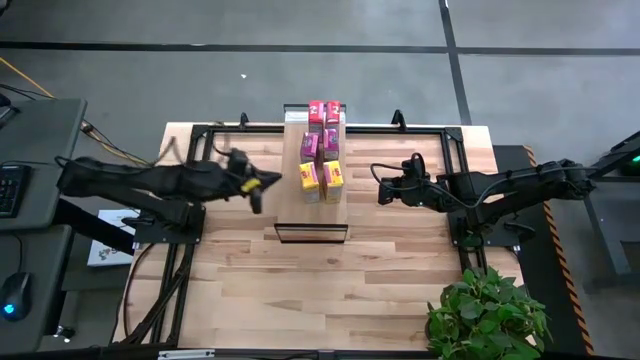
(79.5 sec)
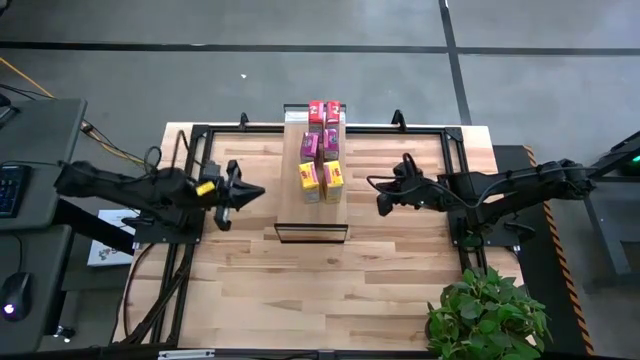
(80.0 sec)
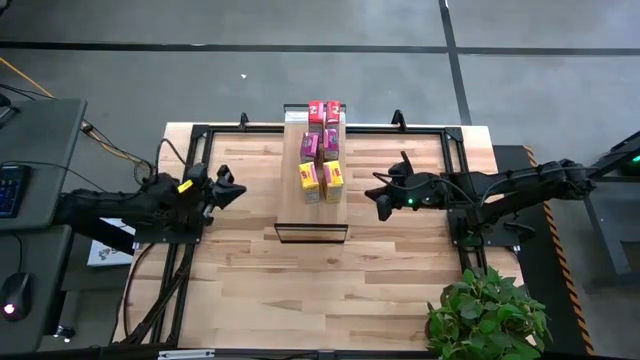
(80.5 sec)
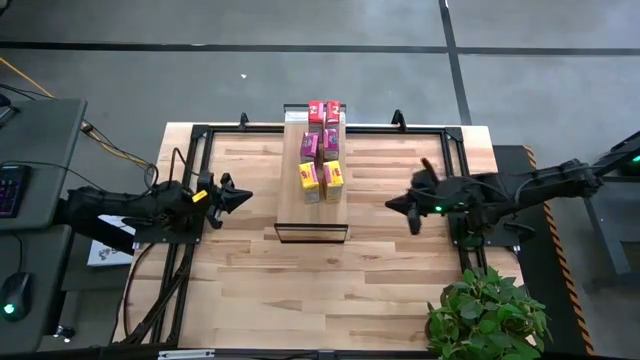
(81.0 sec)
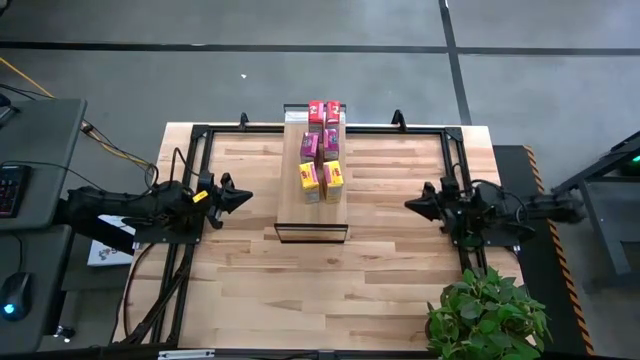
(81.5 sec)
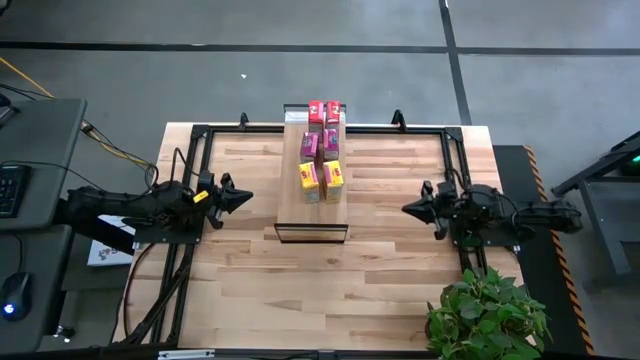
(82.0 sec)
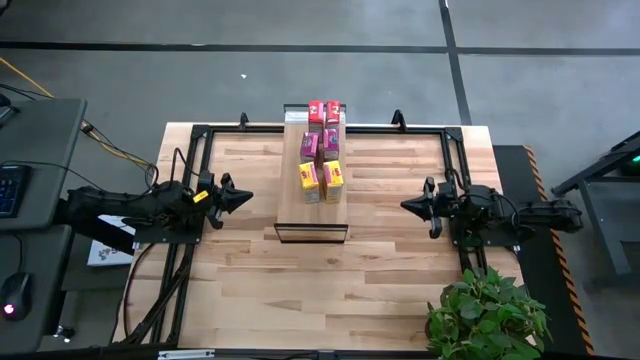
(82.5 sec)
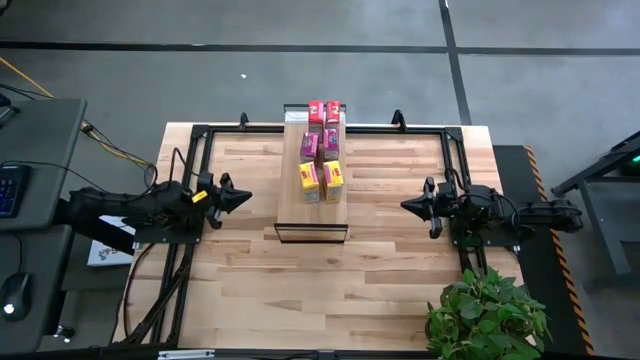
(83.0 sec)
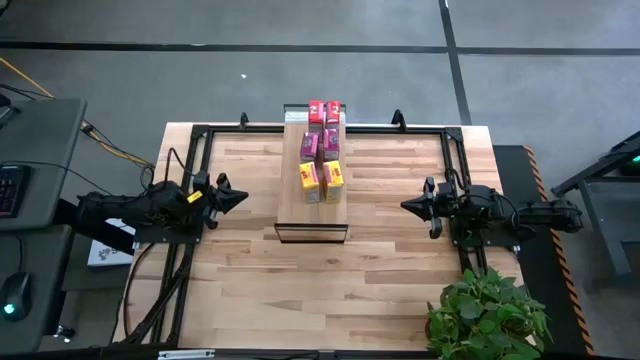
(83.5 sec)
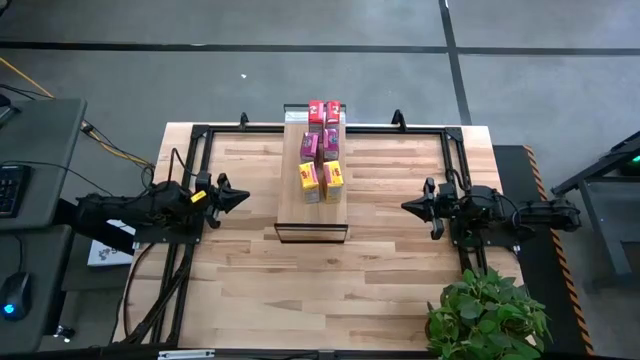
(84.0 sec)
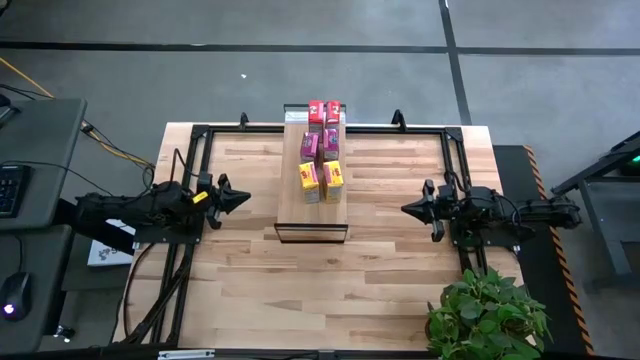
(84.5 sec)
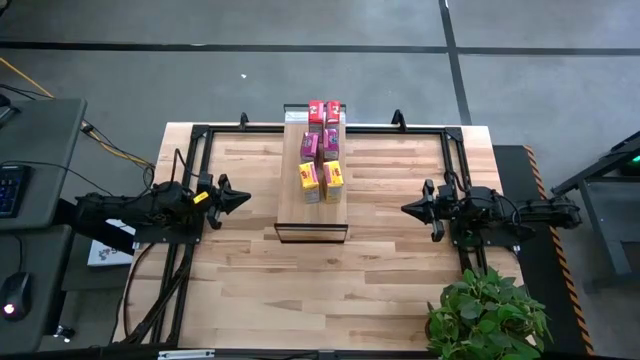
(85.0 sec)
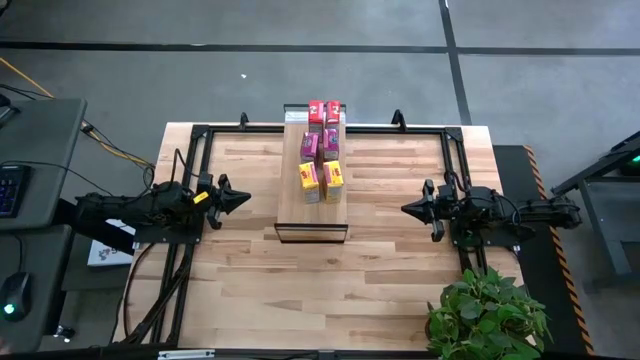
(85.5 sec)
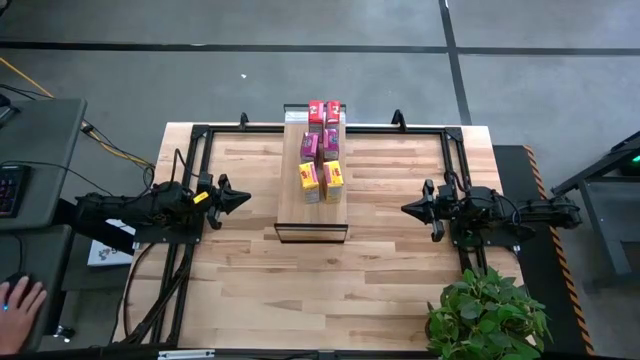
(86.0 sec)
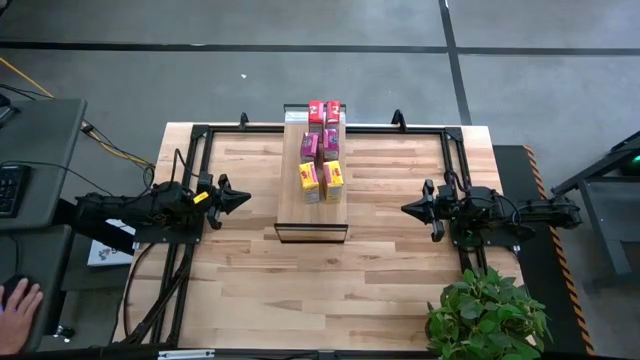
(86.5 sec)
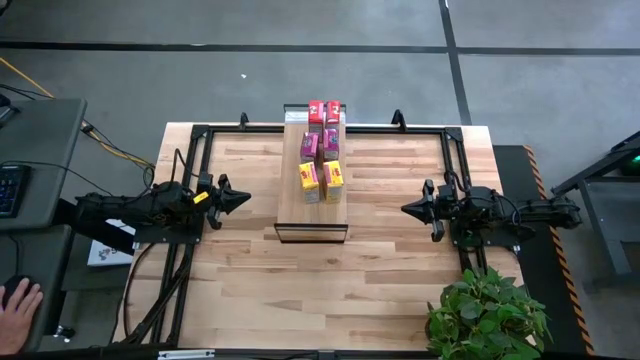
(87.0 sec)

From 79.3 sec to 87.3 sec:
Task: Stack cereal on shelf
Return to Home Position

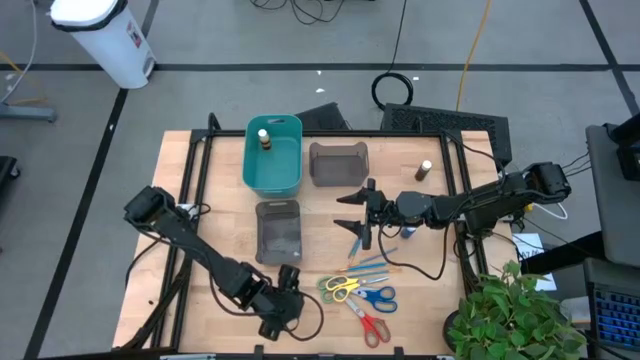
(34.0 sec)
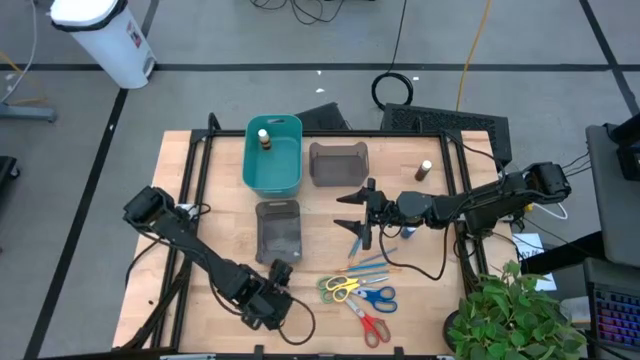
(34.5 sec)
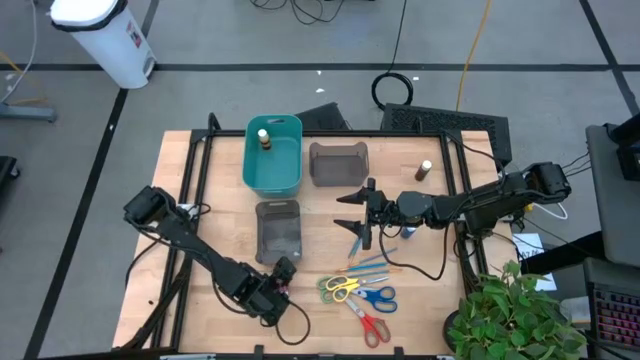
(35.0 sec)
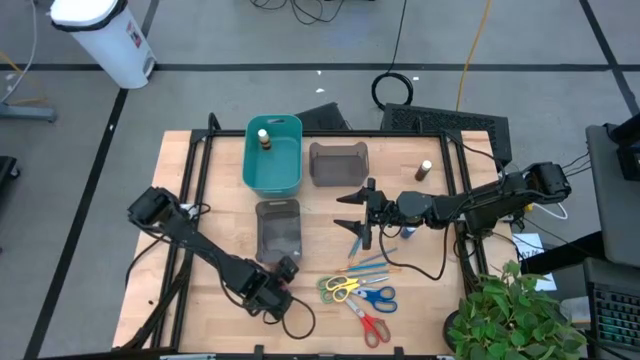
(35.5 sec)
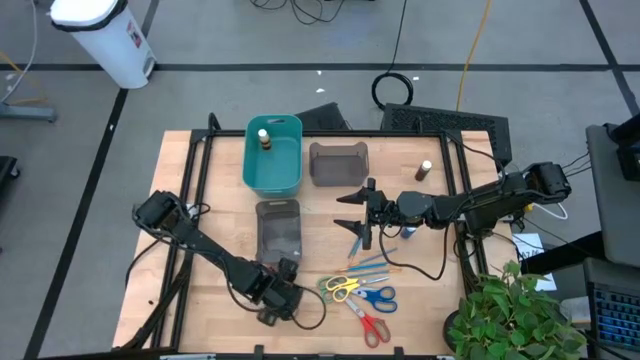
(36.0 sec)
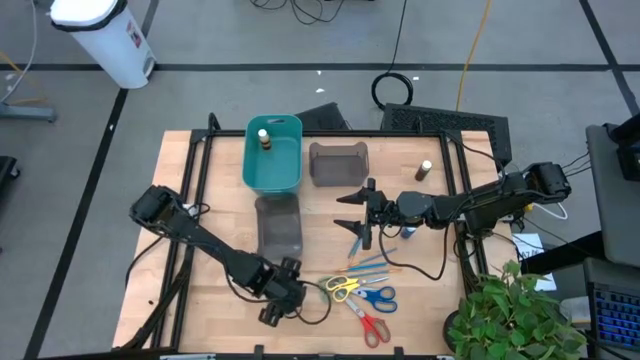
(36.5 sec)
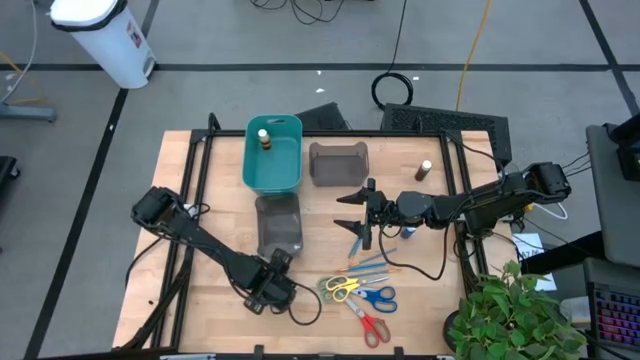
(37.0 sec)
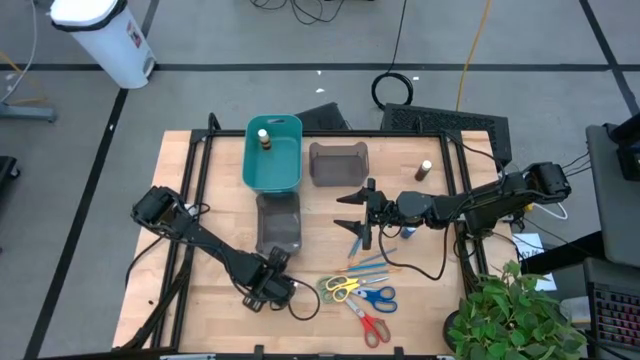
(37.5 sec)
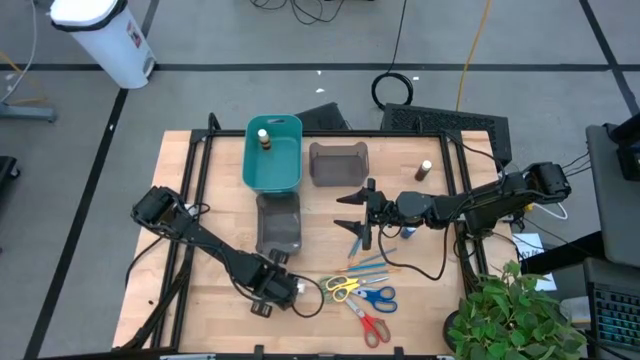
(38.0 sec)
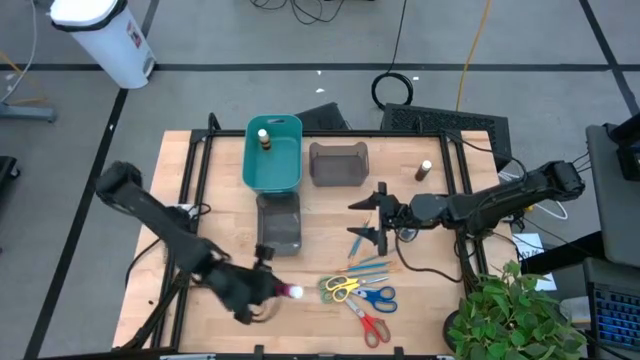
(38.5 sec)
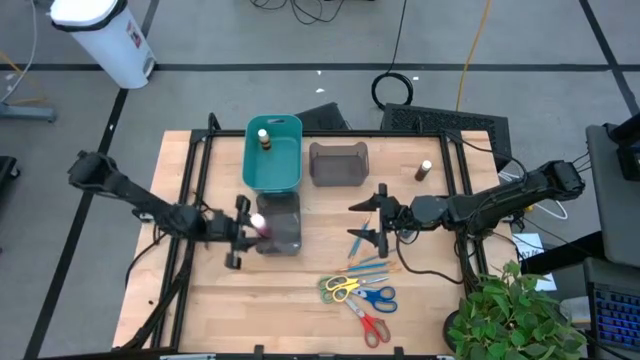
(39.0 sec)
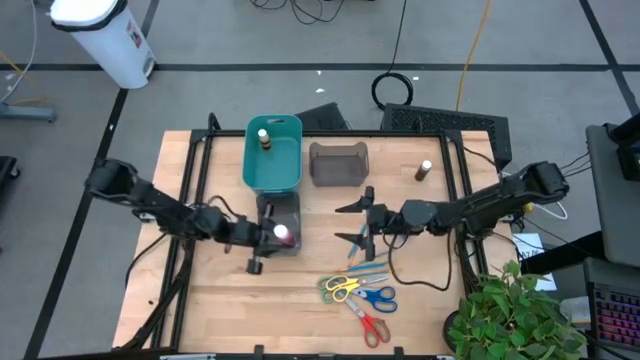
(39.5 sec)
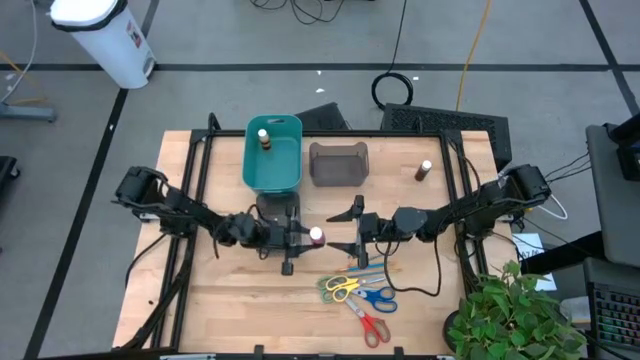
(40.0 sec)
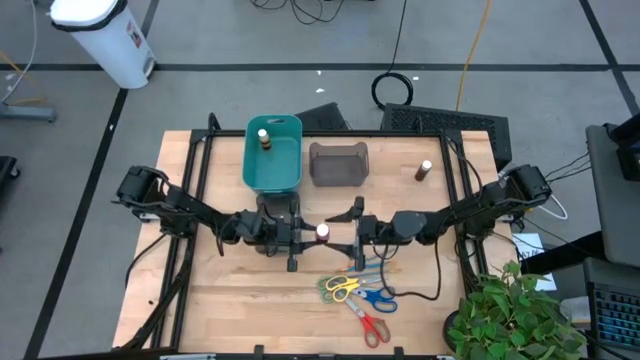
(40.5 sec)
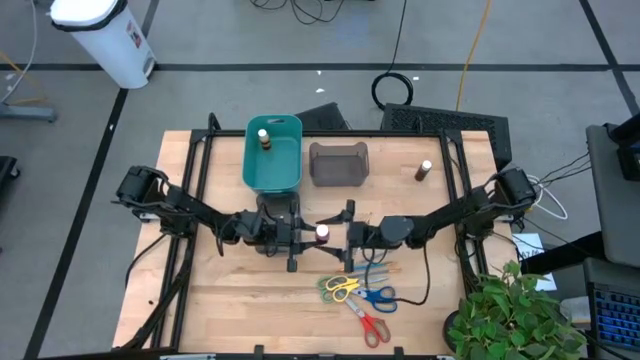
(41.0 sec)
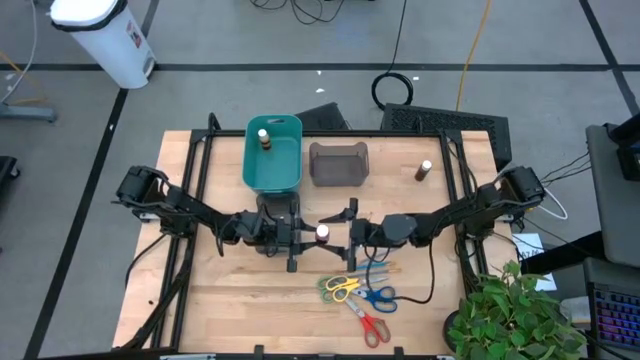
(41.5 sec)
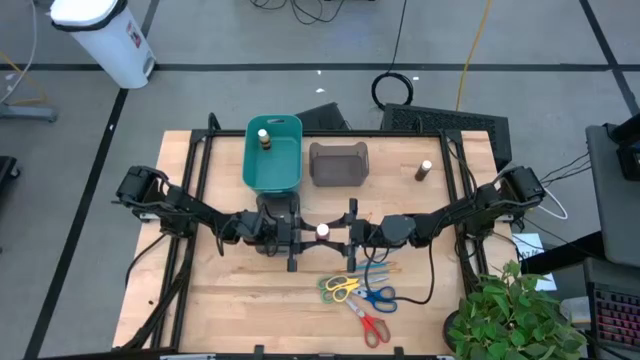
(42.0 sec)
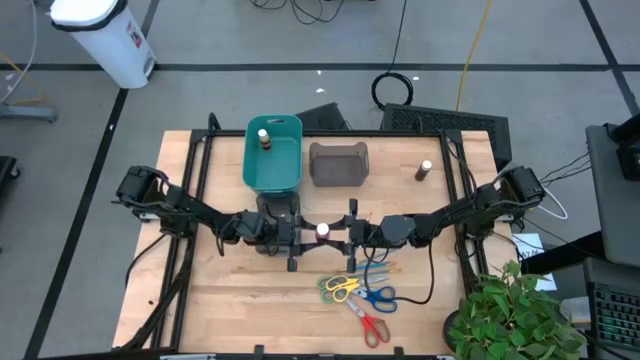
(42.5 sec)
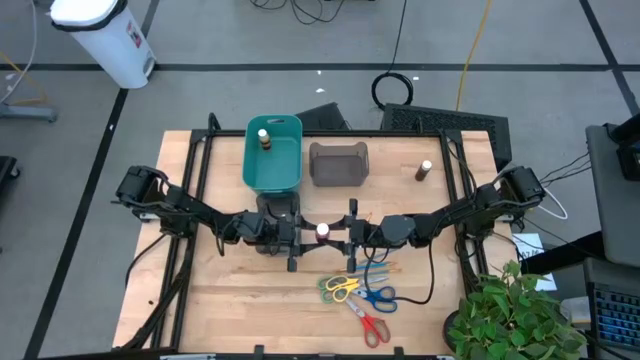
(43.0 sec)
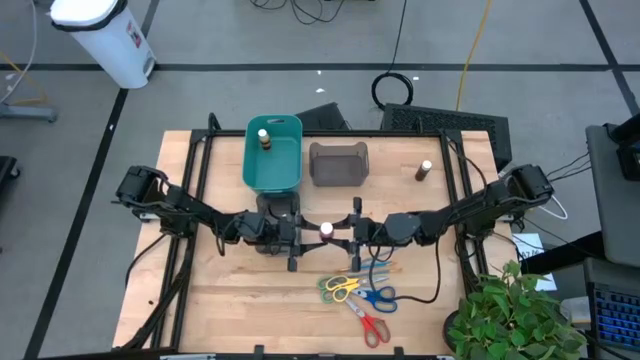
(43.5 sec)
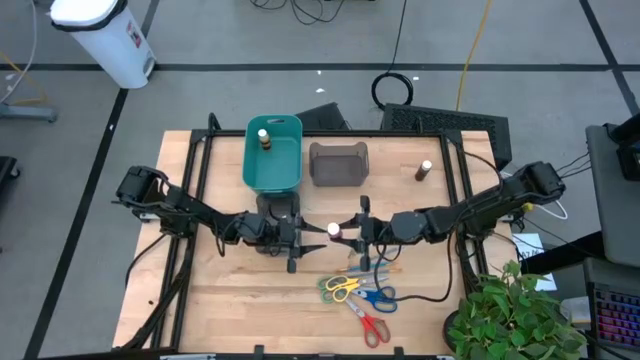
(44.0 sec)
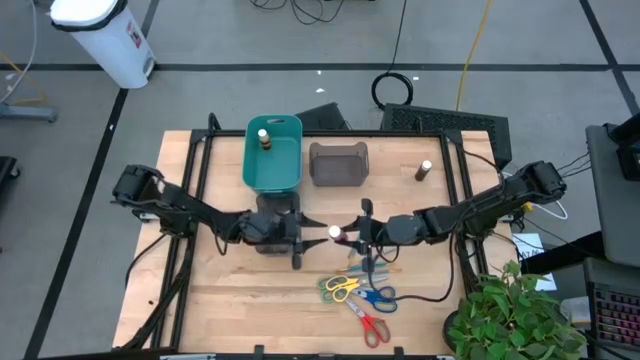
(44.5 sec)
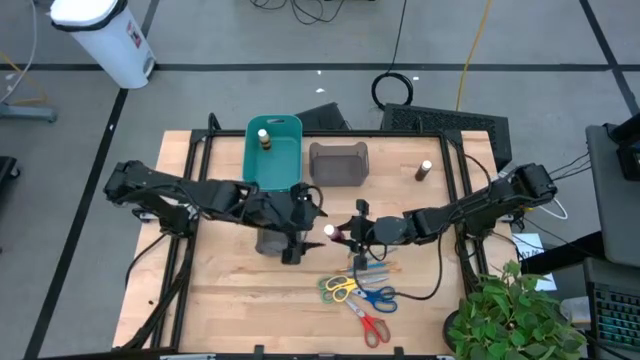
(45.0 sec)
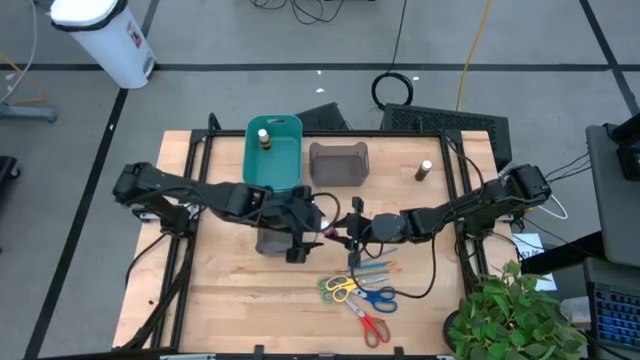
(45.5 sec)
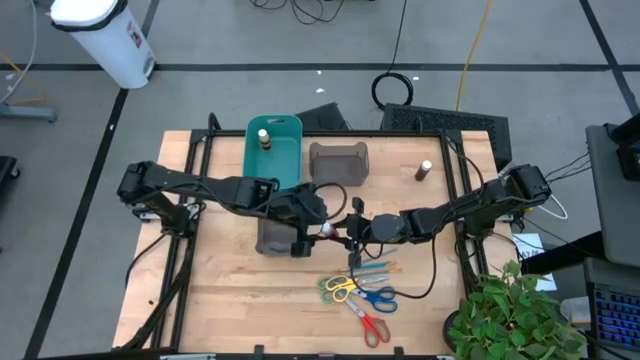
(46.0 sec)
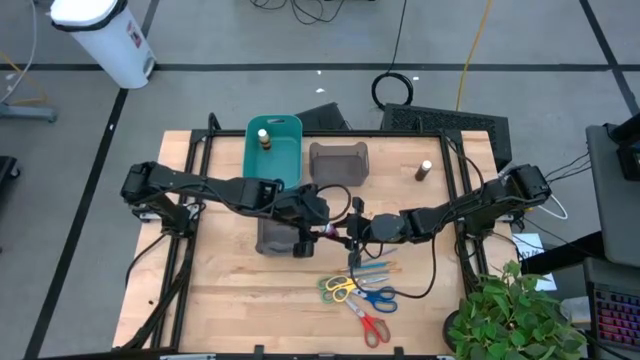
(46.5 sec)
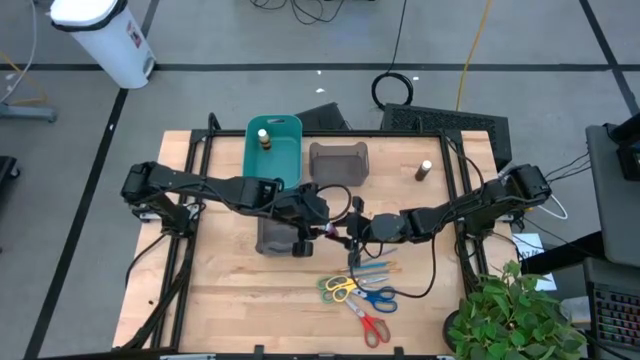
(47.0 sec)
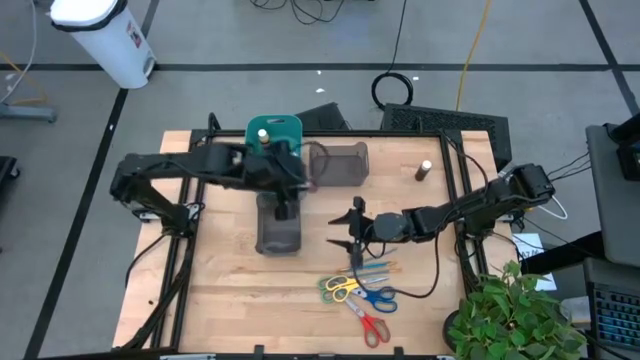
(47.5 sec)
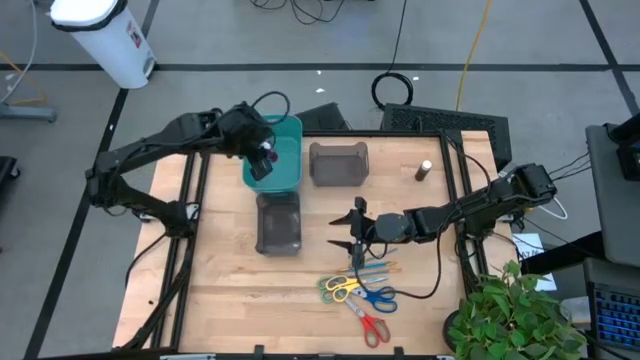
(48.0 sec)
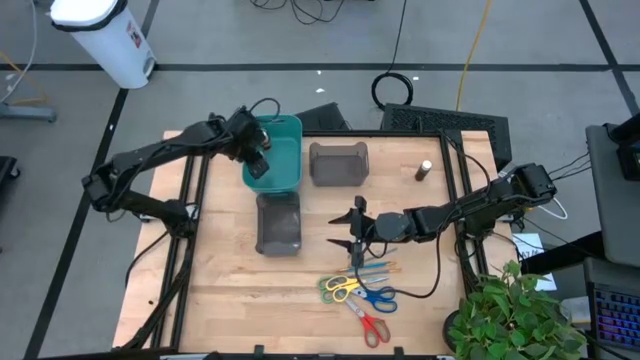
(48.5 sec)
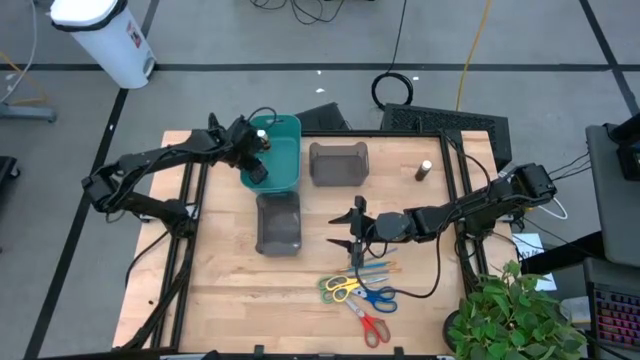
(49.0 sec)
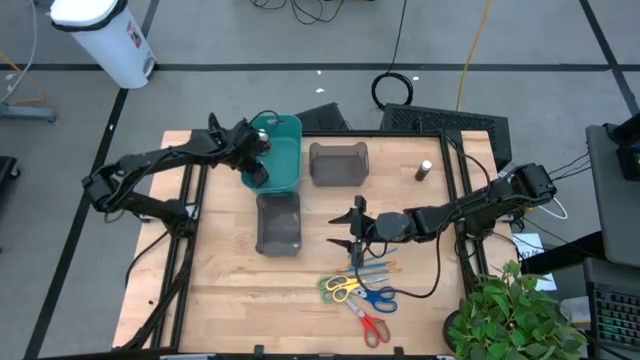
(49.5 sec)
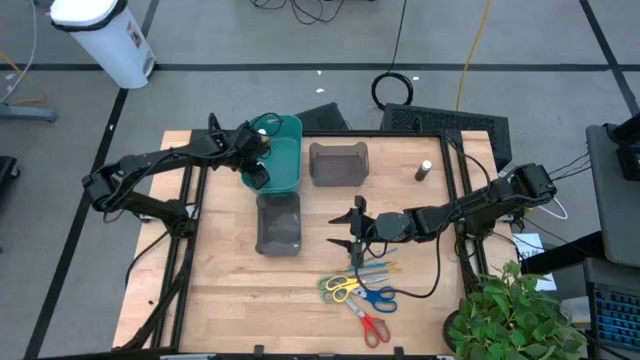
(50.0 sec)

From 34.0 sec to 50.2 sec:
Task: Pick & Place Paint Supplies
Put the pink paint bottle into the blue bin
